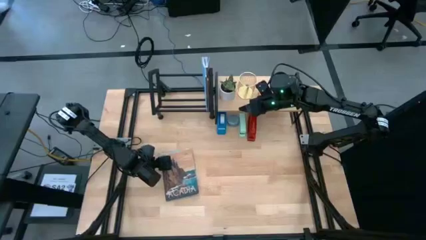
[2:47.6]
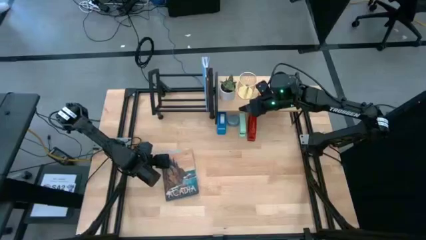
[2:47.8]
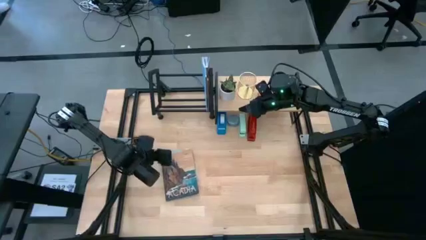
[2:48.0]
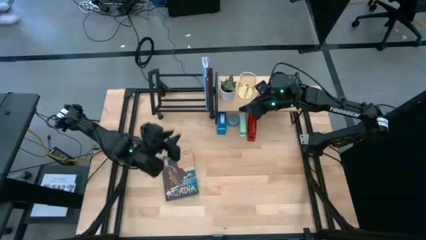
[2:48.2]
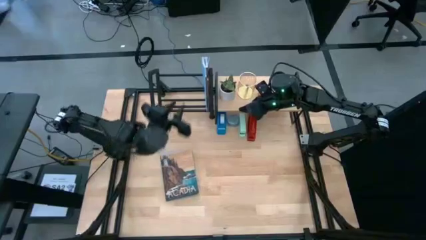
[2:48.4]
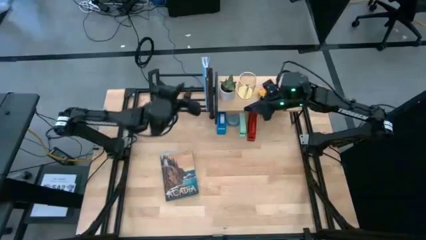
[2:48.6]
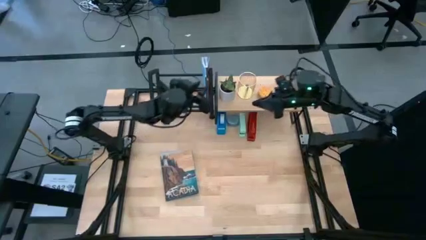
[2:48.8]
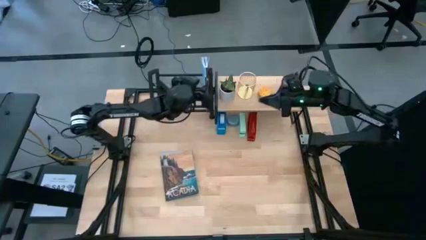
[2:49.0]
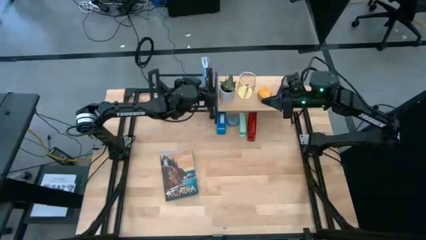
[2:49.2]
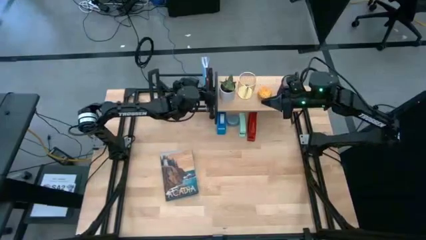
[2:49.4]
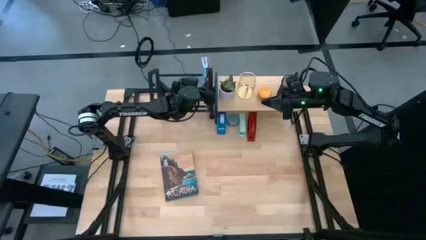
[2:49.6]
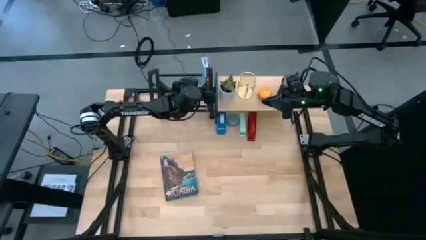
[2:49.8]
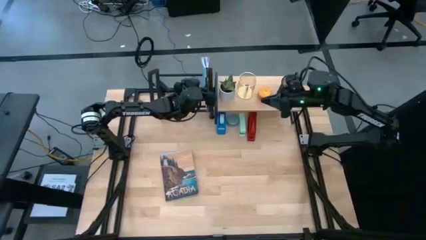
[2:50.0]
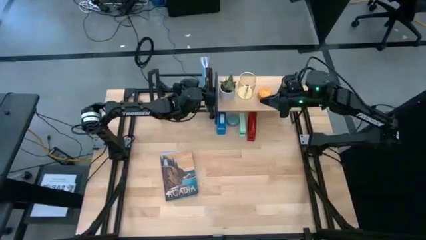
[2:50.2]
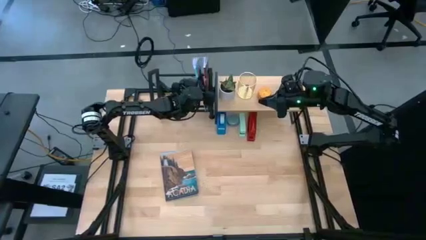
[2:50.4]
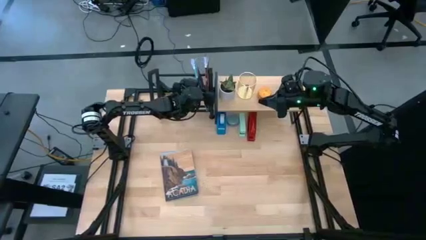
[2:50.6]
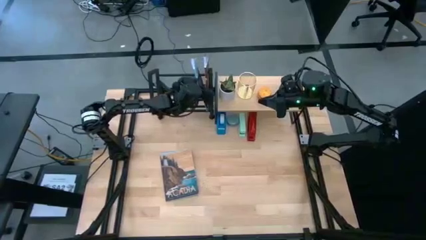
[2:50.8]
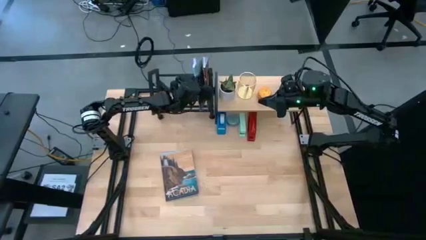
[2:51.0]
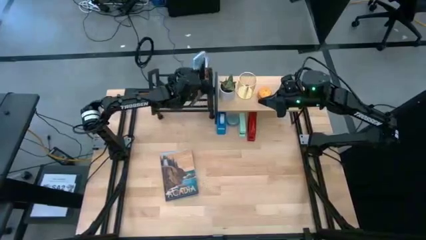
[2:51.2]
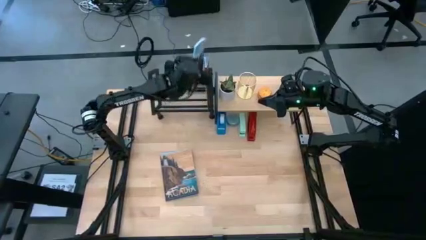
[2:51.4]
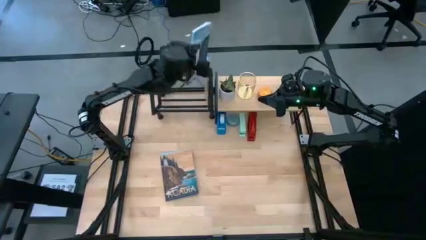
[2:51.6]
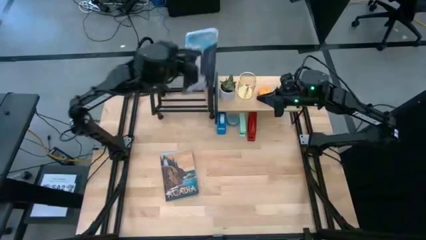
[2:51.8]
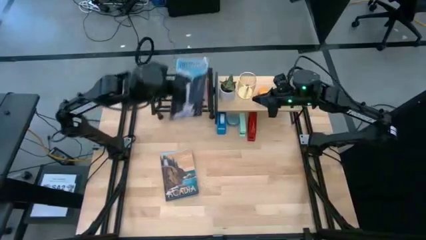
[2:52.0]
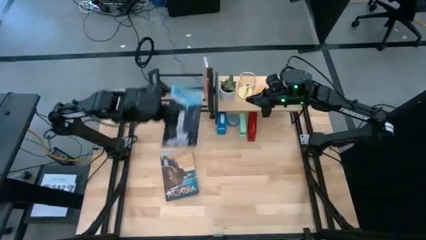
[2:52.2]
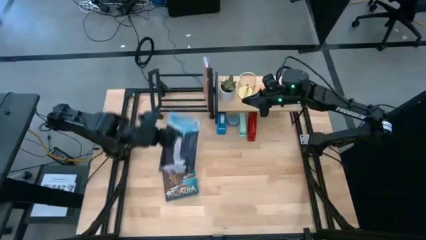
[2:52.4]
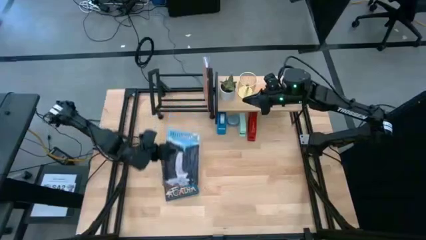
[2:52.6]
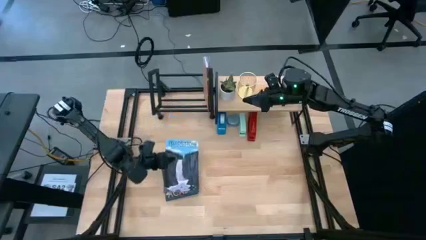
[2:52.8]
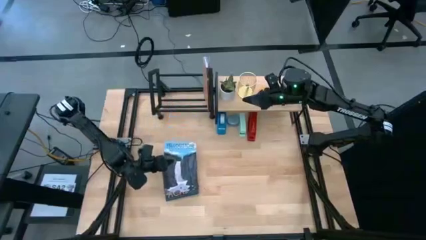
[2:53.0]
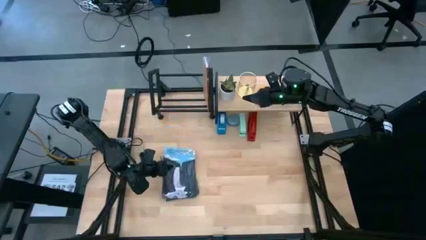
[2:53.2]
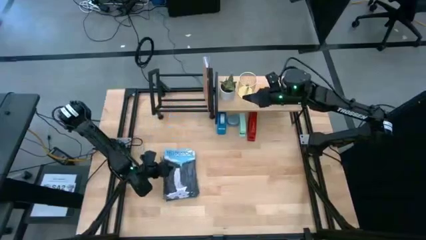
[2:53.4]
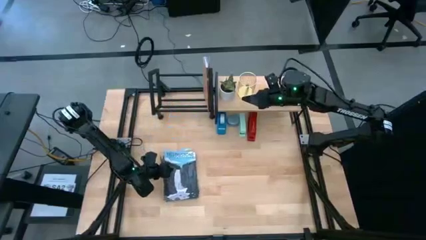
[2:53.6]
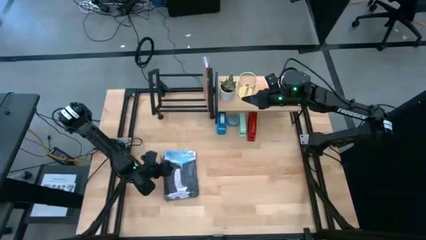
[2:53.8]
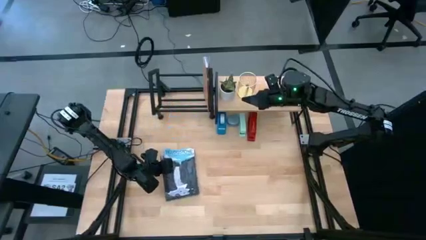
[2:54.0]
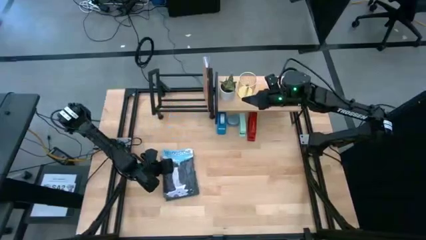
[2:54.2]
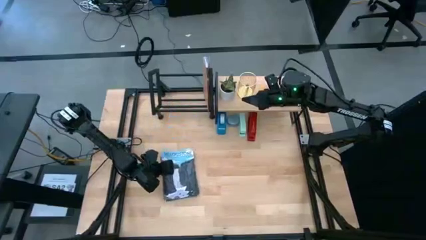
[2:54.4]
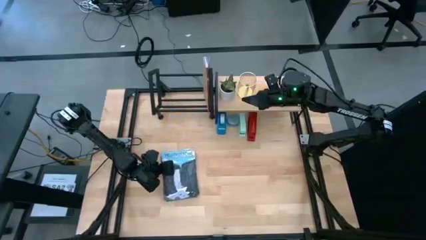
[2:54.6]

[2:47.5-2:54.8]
Task: Stock shelves
Remove the blue book from the black book shelf

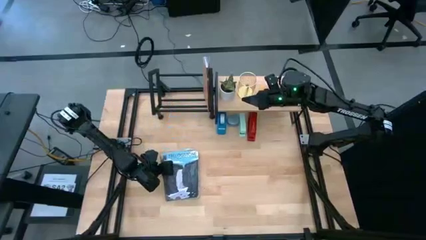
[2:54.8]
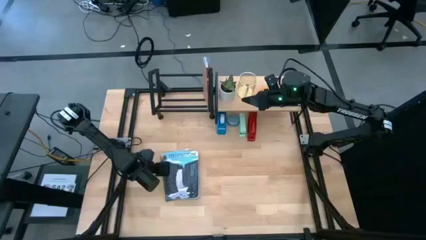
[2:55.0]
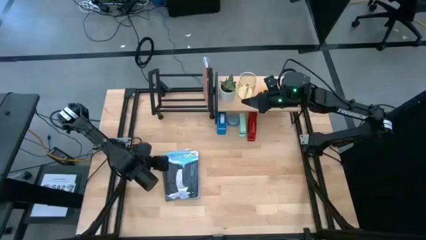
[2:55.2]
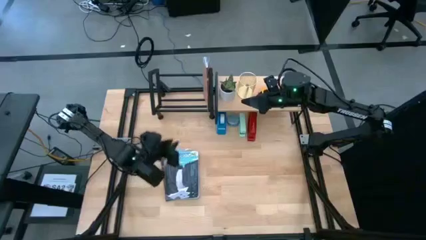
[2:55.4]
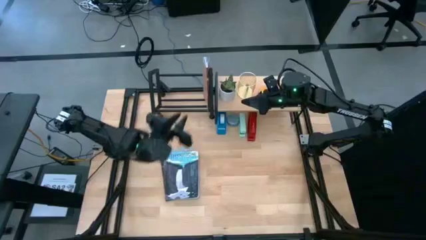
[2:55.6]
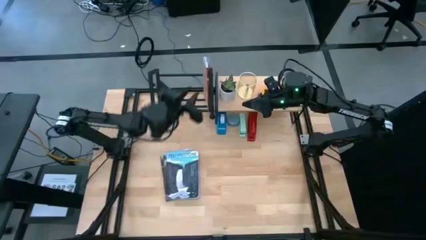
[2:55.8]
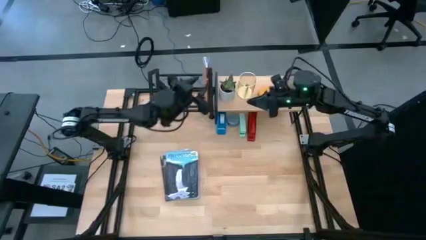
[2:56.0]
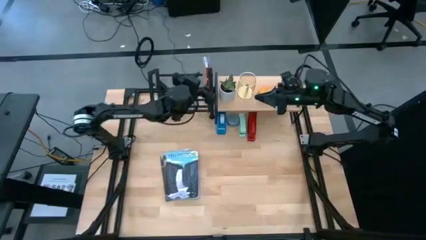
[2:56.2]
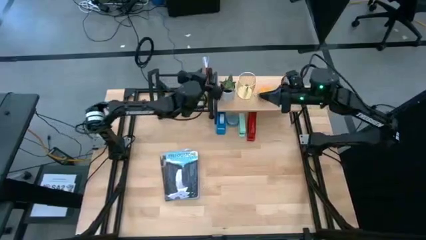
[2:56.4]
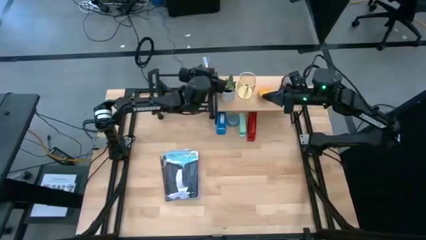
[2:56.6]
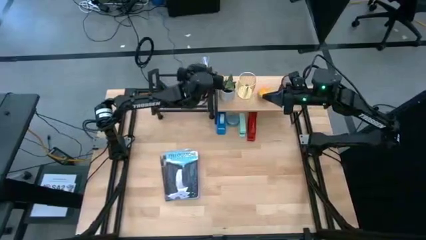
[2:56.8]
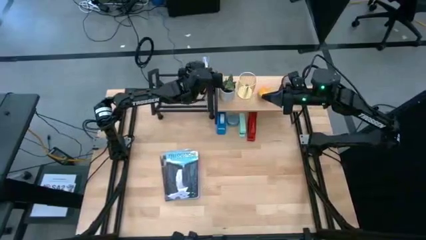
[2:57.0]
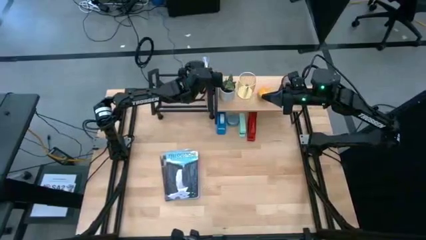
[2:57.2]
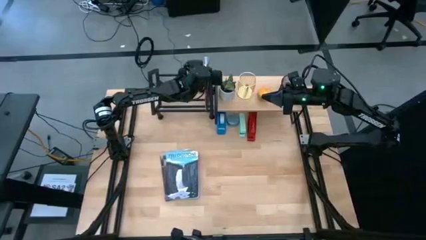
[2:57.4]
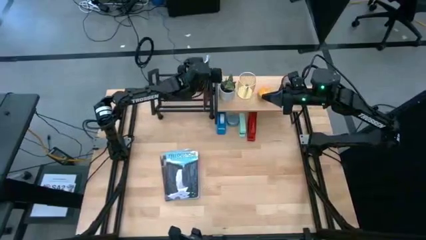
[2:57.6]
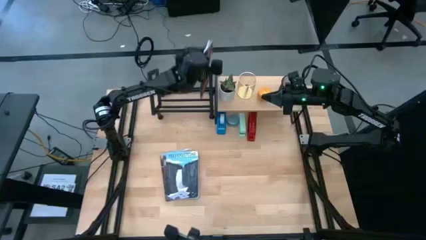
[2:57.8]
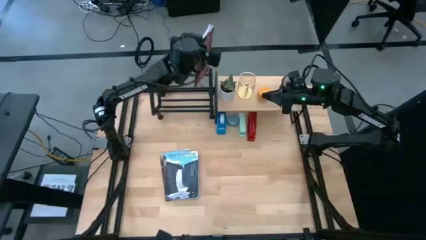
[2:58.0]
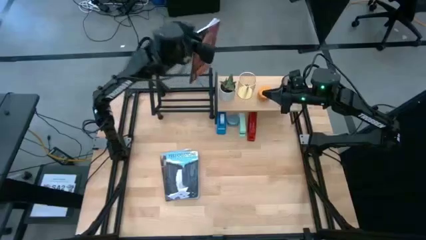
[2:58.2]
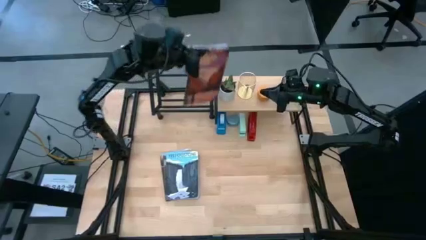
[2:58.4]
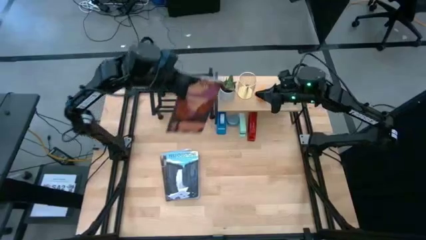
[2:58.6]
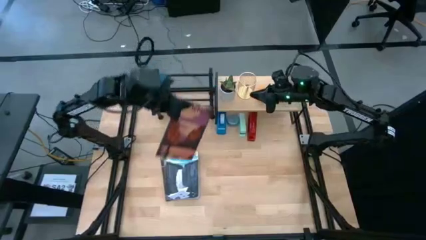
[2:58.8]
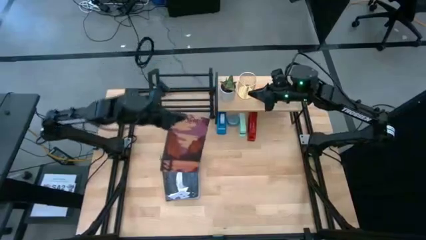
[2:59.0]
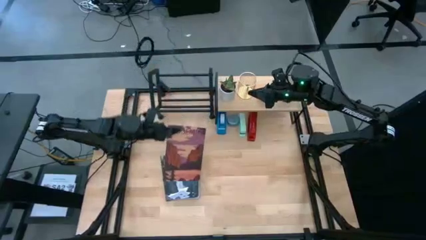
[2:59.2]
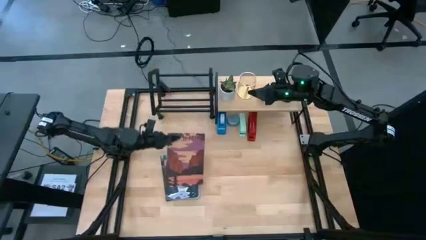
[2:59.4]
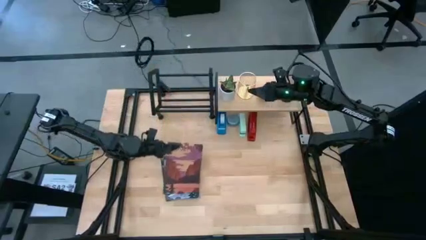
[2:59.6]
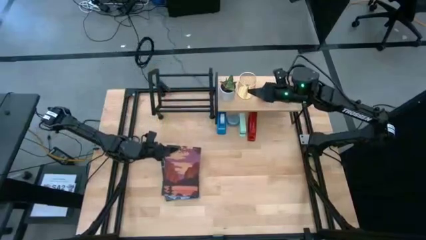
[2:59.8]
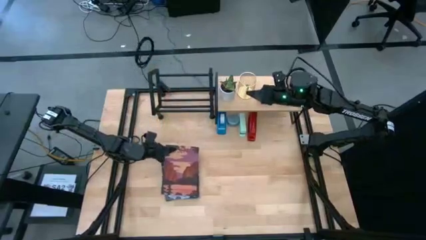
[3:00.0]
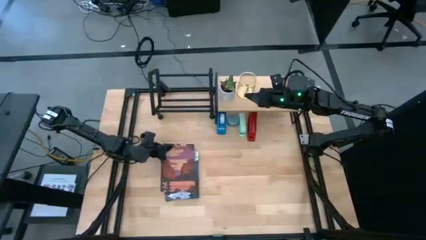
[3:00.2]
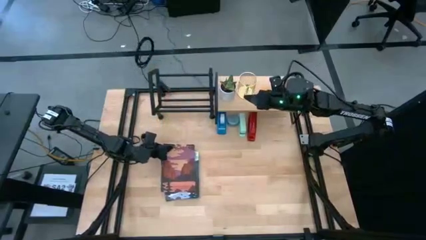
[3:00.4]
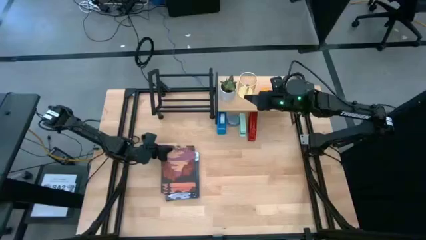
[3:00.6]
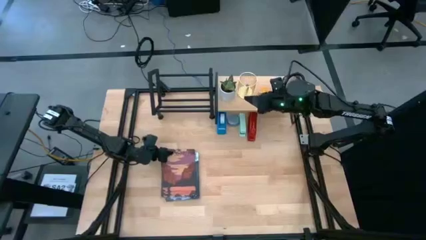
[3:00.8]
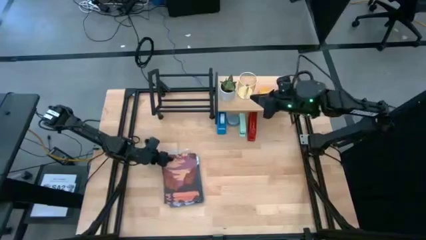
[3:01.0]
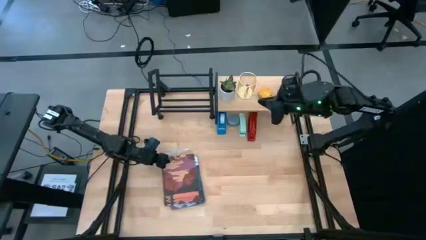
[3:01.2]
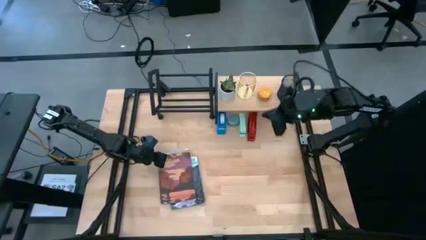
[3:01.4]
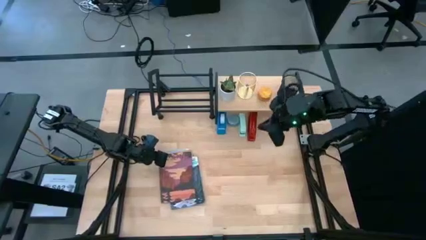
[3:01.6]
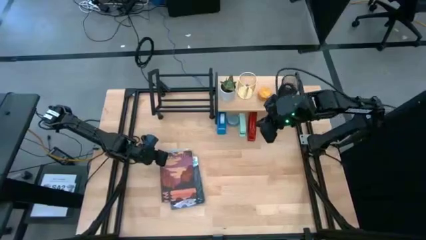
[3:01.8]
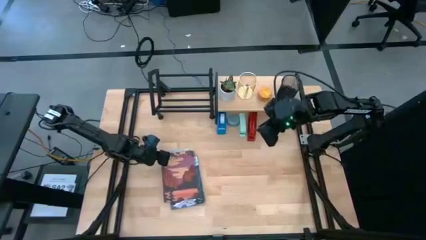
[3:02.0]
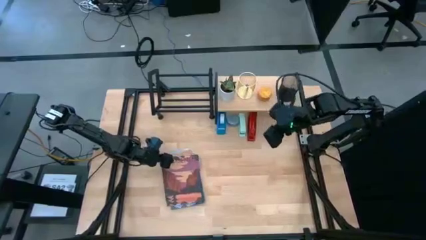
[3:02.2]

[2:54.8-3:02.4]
Remove the brown book from the black bookshelf

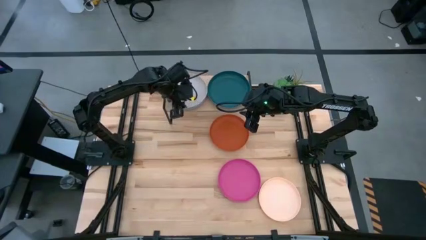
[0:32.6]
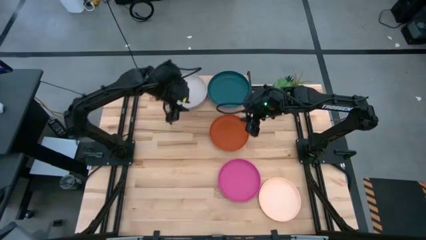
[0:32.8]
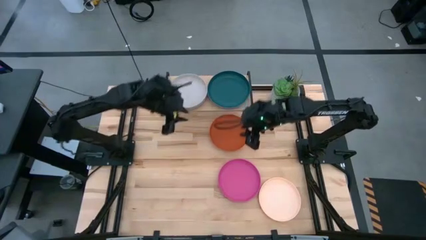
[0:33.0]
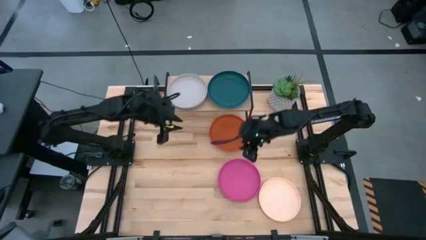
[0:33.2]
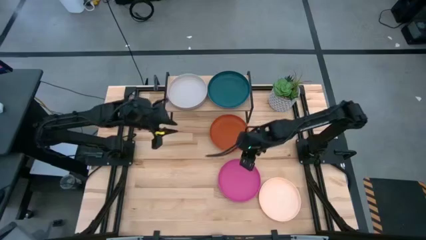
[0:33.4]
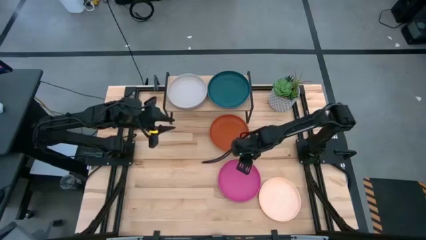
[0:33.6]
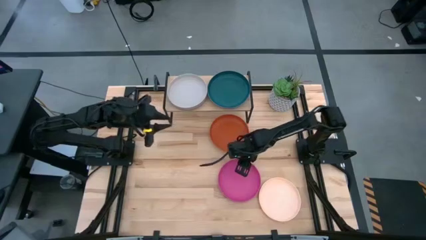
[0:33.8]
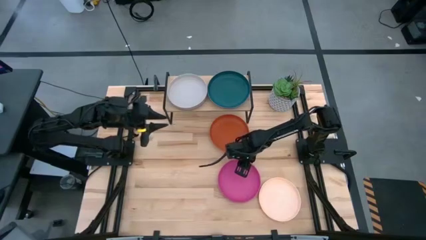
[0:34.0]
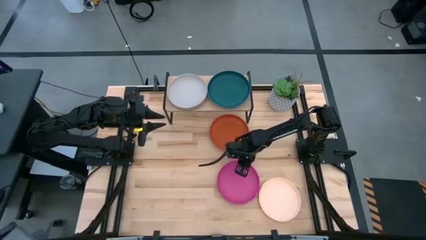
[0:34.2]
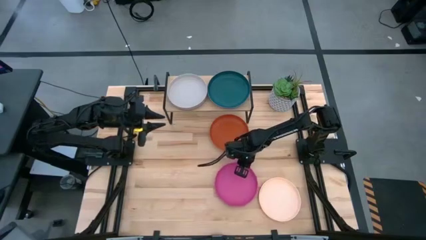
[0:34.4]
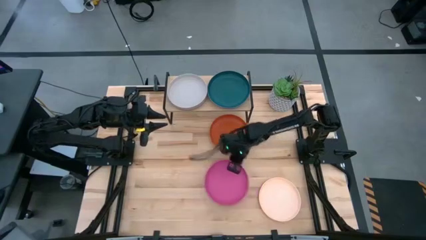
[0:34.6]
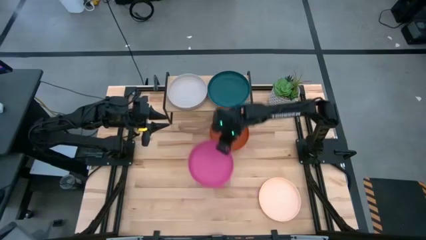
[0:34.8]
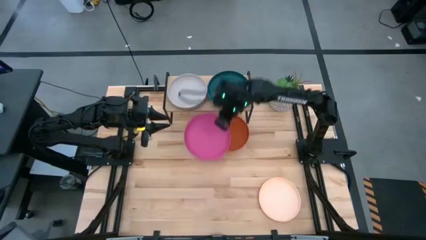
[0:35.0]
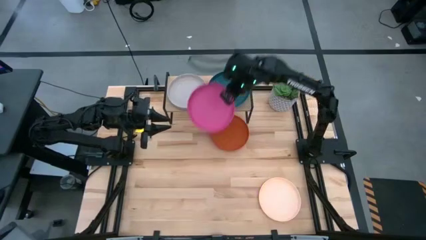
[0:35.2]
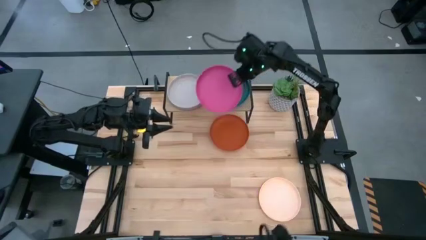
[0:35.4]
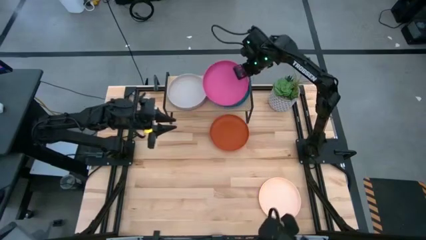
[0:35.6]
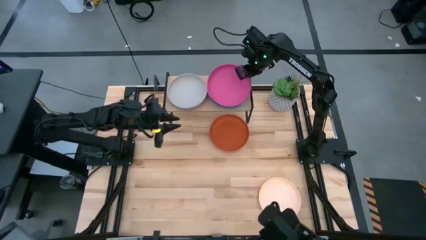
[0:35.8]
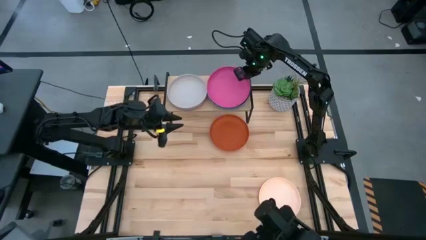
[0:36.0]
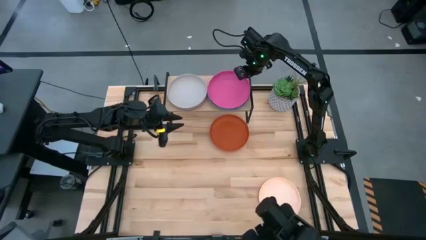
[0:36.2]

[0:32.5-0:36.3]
Task: Place and stack plates onto a shelf
Stack the pink plate on top the dark green plate on the shelf
